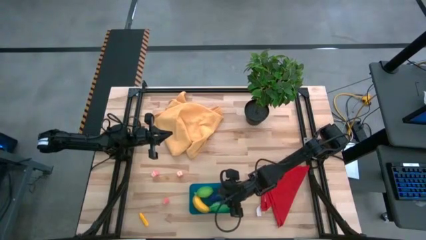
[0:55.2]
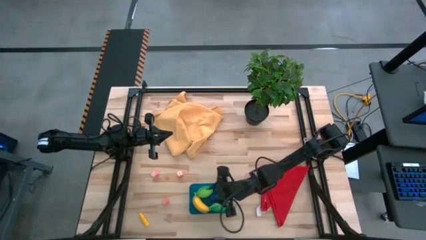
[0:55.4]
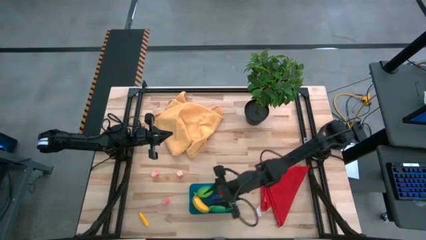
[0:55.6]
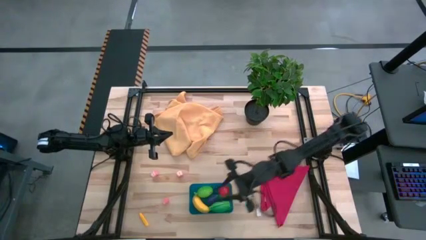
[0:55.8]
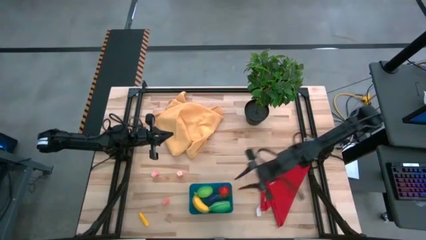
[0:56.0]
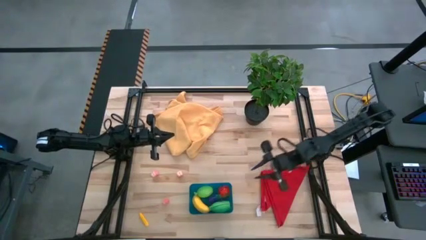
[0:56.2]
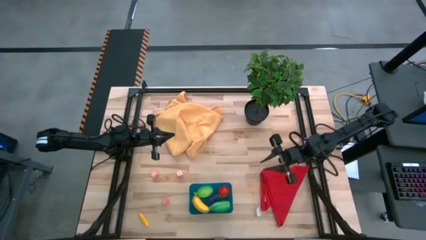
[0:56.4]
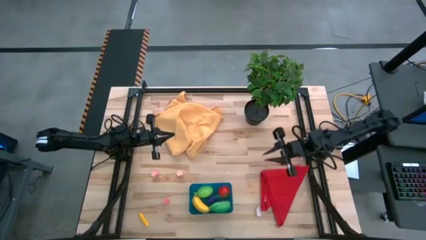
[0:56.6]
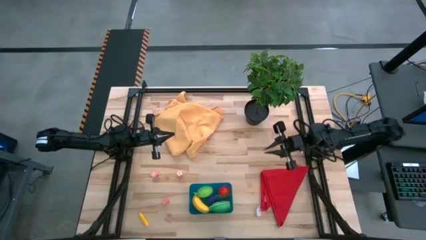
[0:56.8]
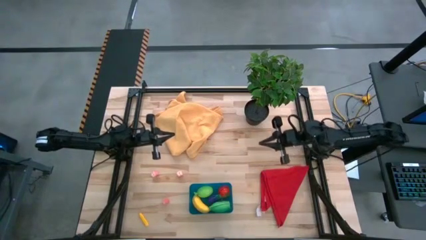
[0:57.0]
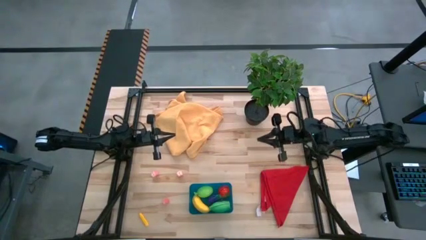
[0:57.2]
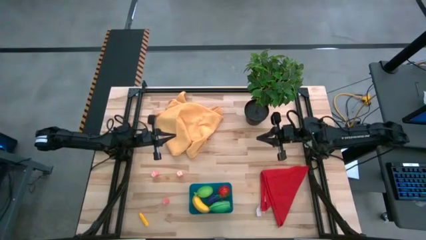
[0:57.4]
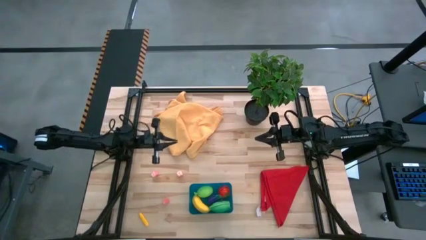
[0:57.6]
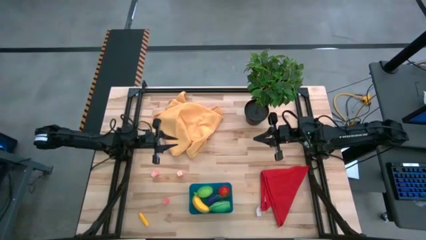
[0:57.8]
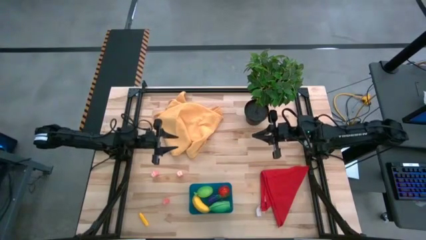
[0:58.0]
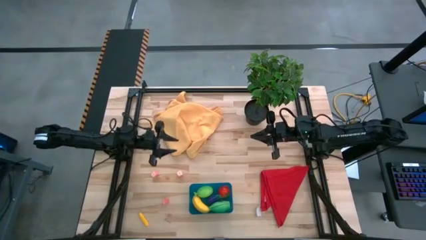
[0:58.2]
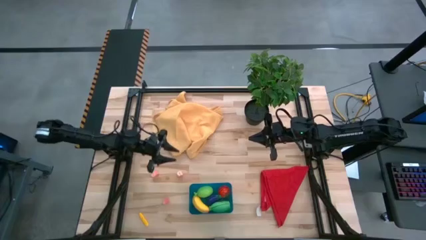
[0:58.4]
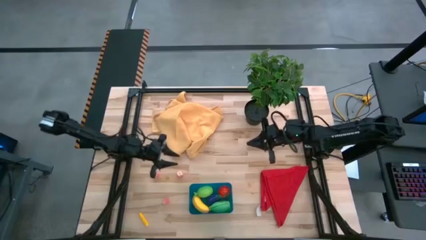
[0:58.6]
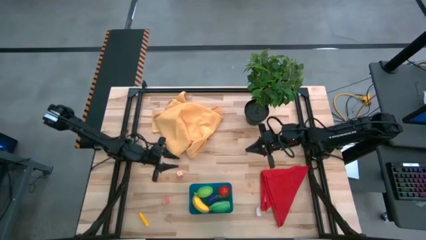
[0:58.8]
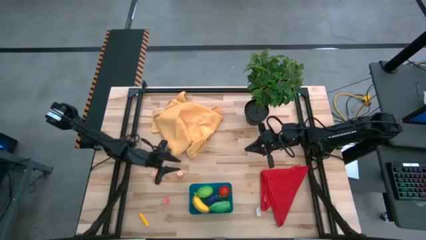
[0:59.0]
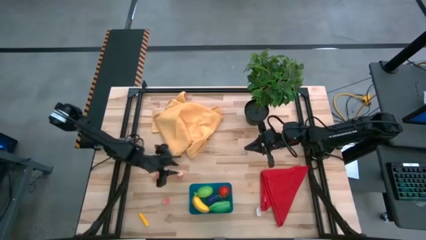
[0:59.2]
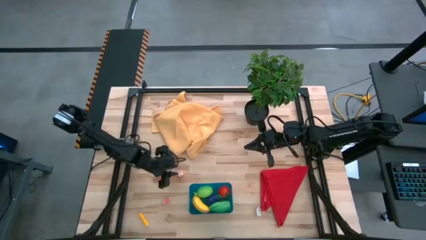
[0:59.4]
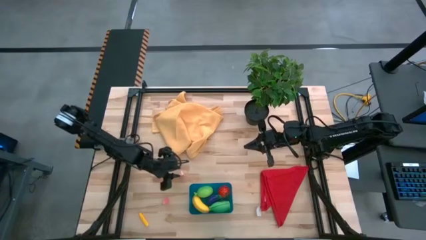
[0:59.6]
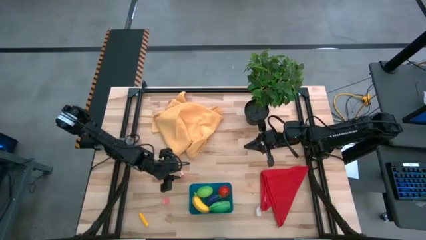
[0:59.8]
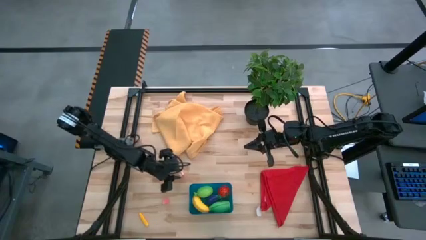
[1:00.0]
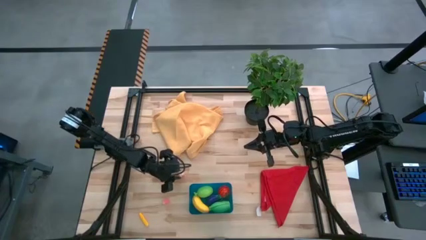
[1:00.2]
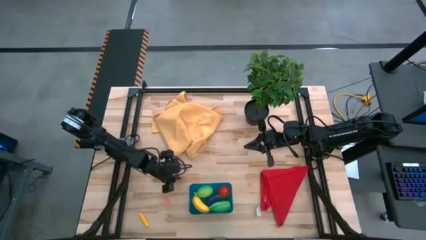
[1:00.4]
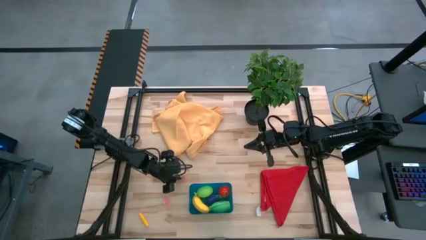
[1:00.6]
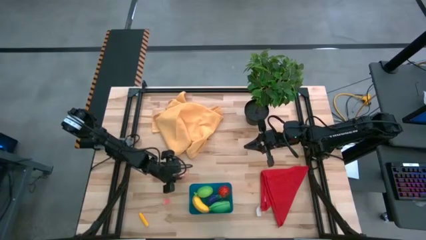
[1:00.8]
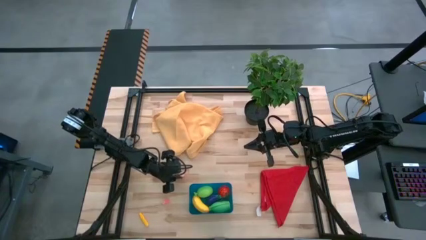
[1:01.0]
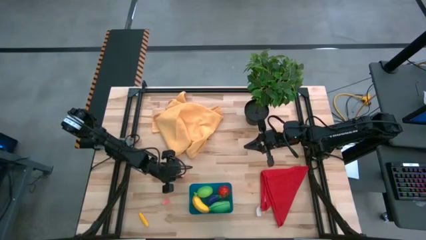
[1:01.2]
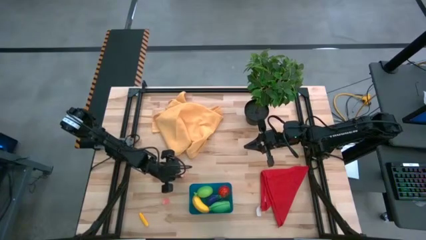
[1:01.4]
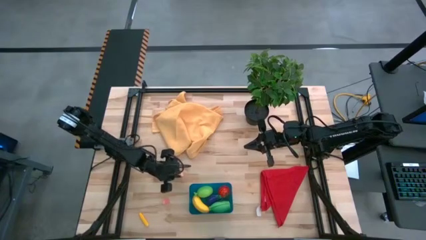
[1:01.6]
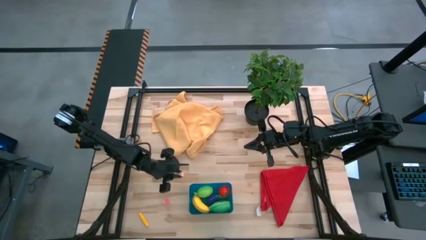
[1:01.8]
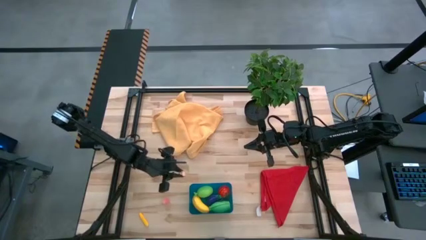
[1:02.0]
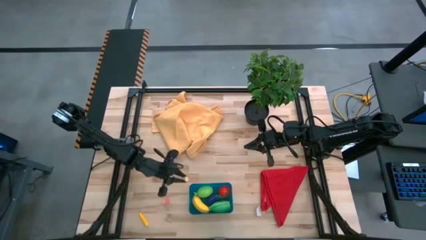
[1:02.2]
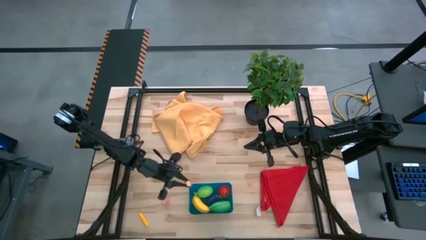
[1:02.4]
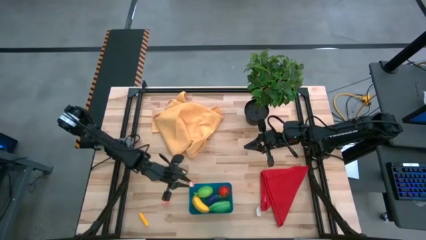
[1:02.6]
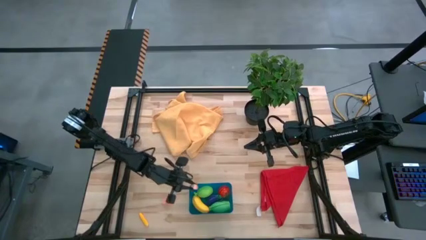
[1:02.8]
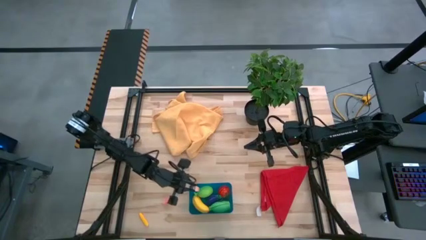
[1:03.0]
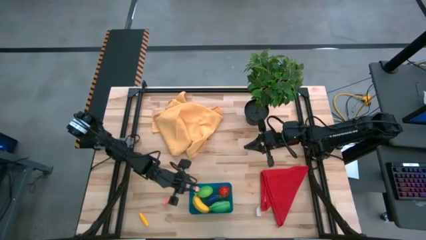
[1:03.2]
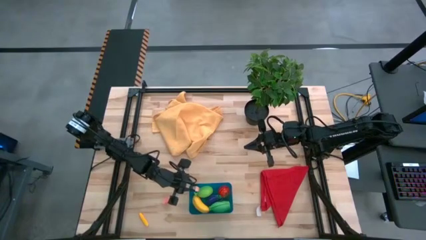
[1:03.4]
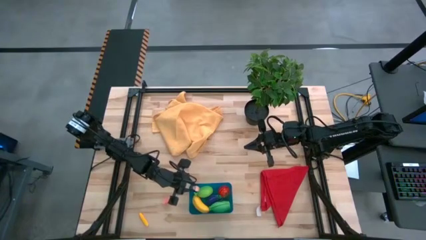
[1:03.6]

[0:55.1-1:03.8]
Task: Pick and placing Produce into tupperware
Put the top right pink peach into the blue bin

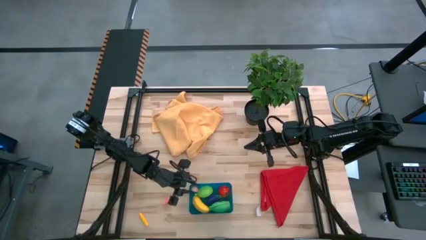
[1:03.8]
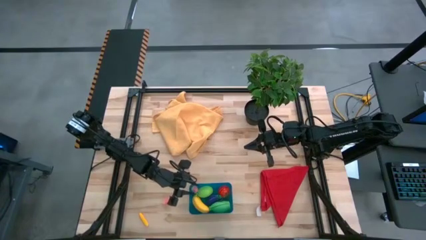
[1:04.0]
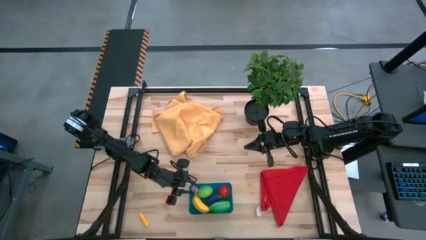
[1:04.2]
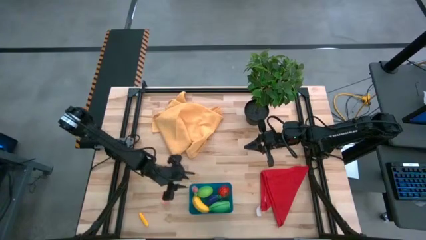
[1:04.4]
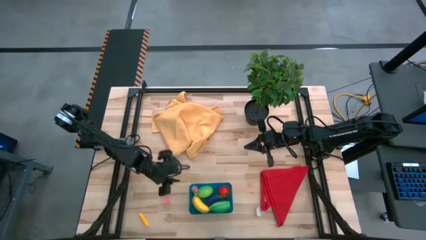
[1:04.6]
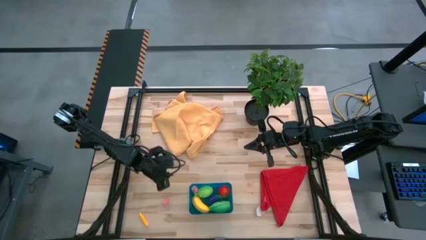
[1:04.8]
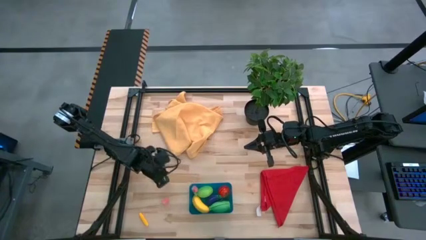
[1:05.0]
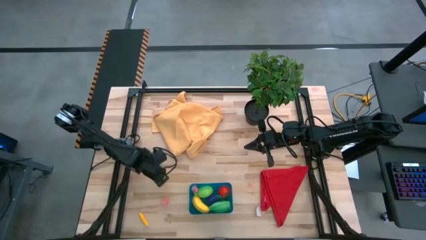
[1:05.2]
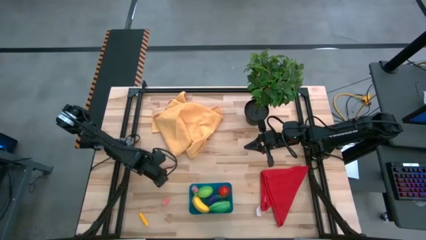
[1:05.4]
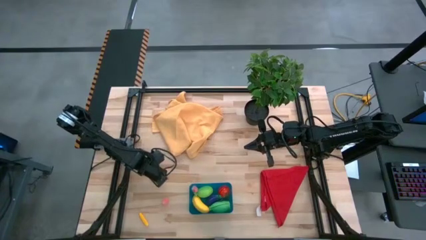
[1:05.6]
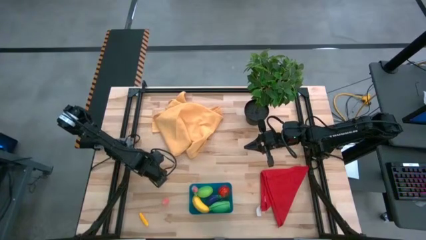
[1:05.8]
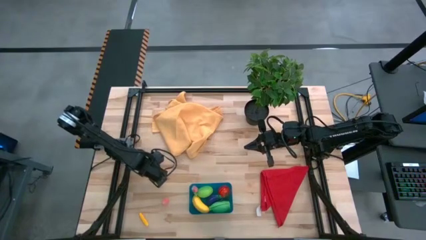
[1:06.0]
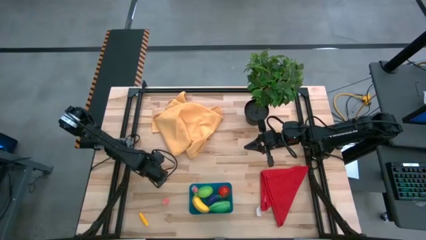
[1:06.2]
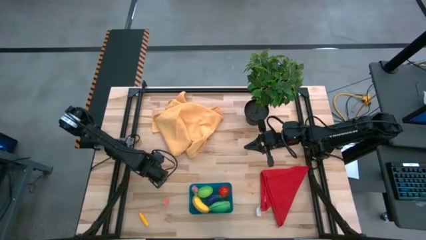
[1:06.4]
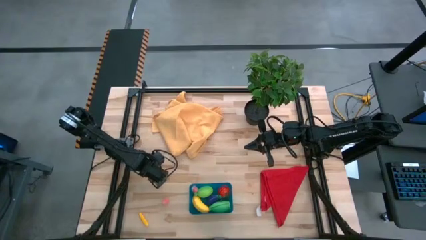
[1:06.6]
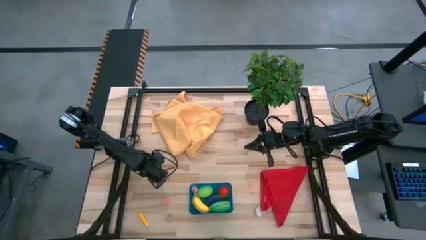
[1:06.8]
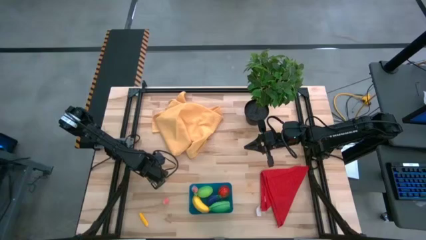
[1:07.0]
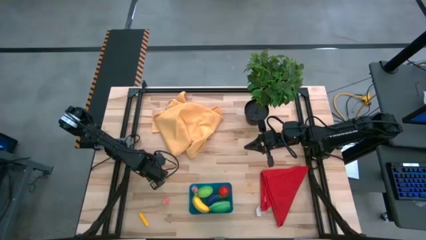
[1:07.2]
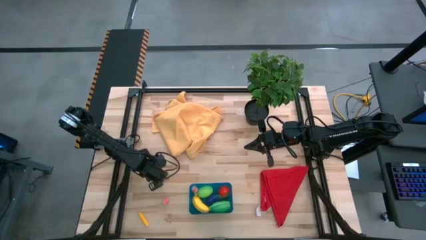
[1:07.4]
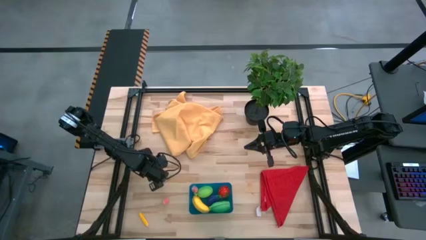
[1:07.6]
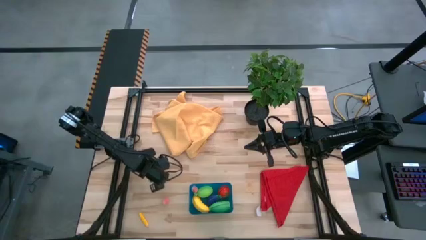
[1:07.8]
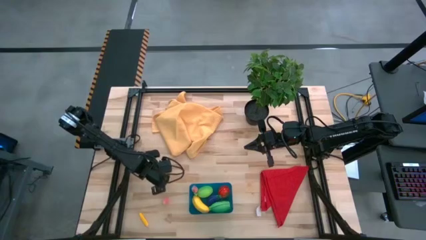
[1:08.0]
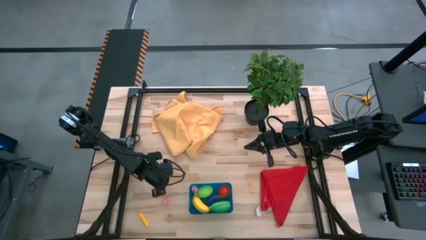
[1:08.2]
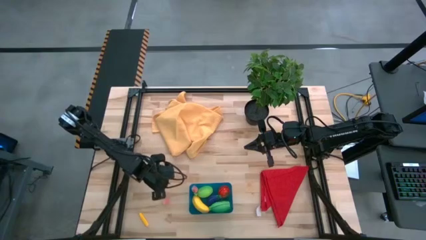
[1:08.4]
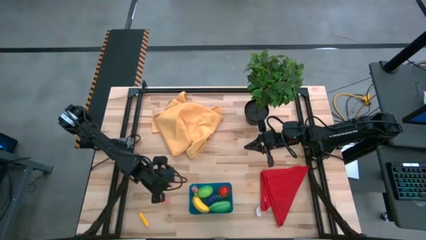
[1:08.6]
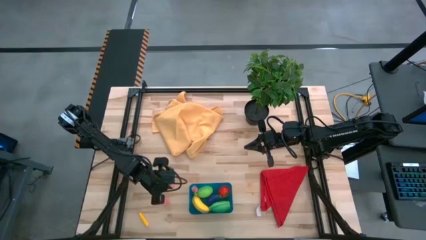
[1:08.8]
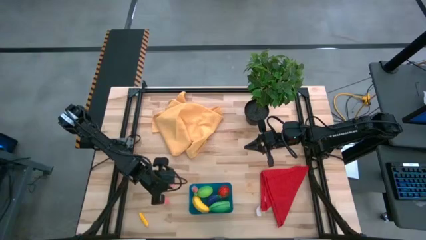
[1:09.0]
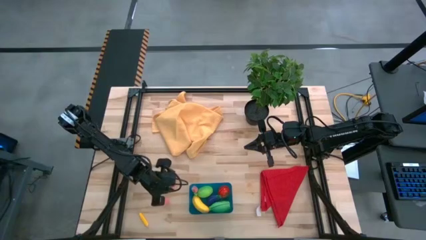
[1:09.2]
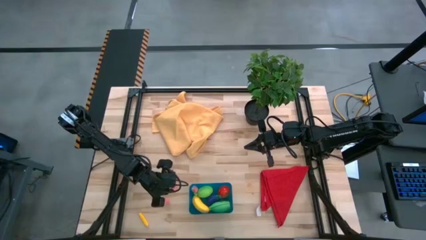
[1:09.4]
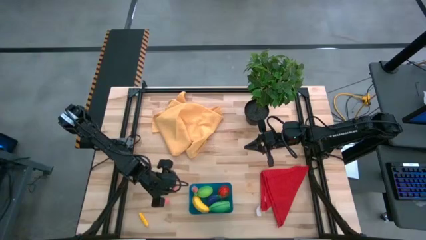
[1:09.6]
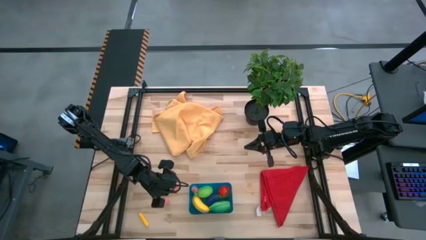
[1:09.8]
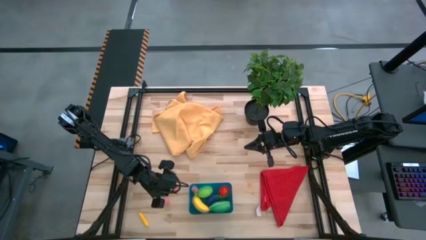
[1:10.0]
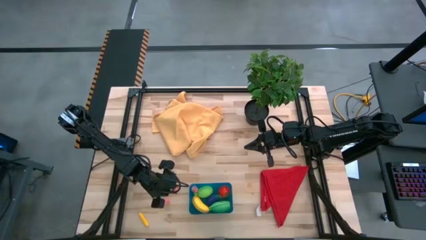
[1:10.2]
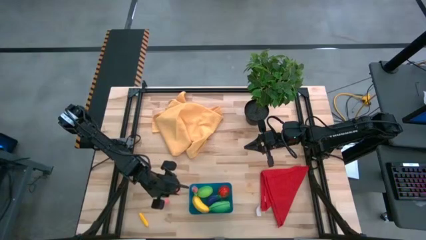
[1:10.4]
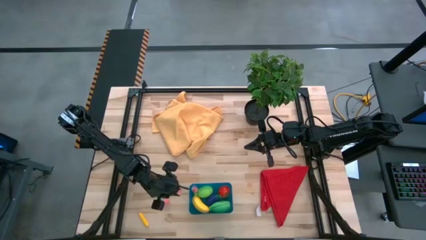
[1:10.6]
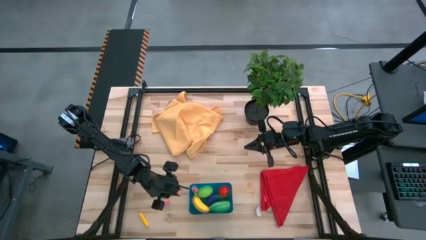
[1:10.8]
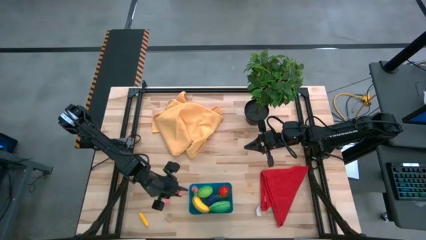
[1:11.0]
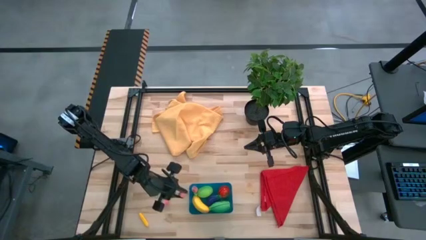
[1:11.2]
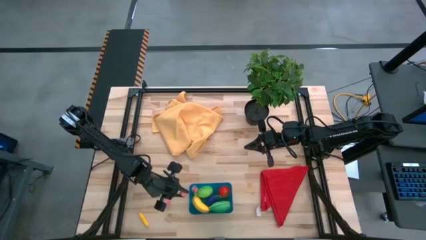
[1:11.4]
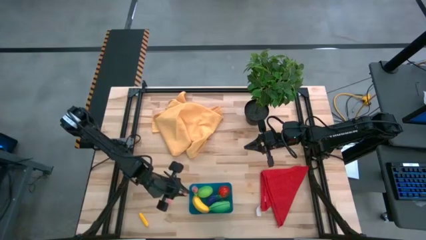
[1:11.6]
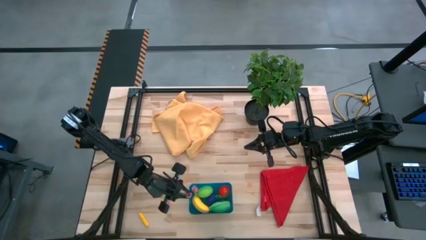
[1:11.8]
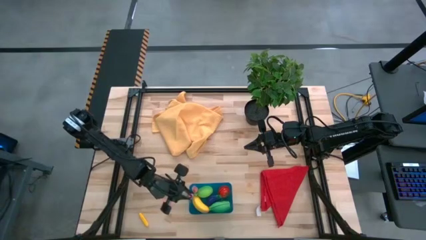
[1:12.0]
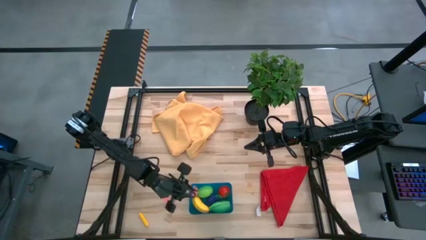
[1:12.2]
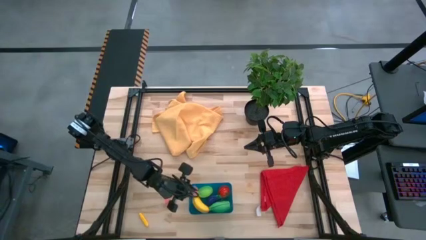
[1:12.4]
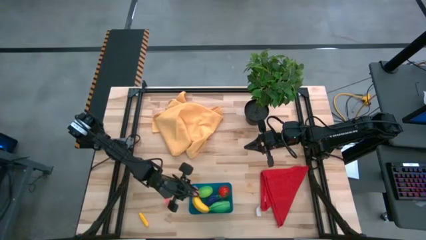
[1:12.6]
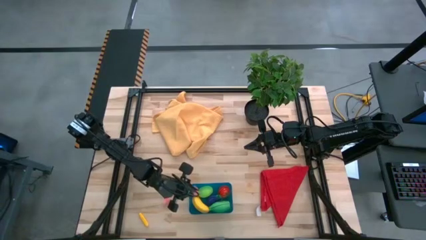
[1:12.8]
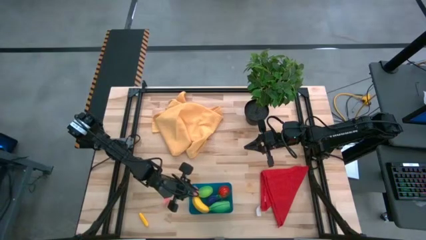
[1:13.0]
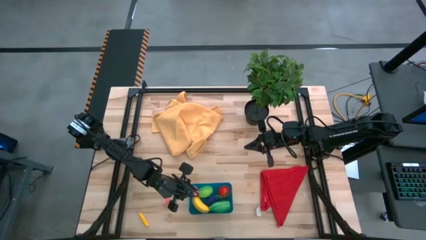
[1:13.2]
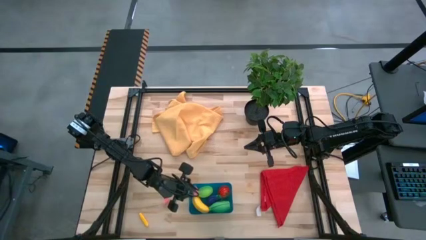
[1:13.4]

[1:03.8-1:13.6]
Put the top pink peach into the blue bin
